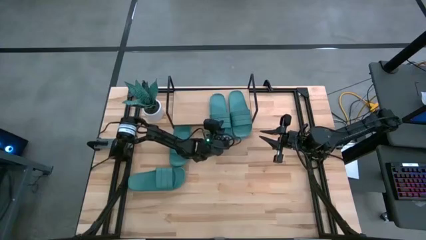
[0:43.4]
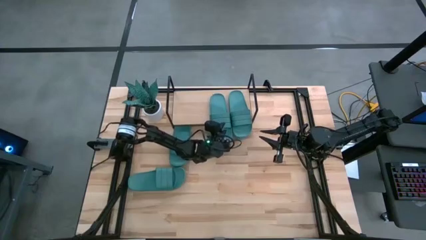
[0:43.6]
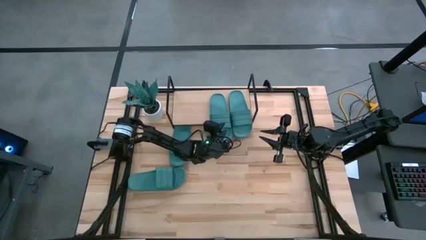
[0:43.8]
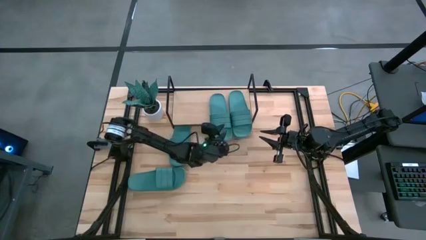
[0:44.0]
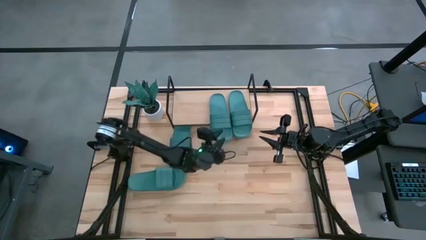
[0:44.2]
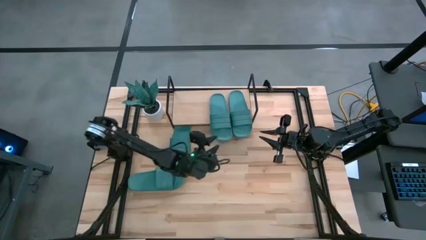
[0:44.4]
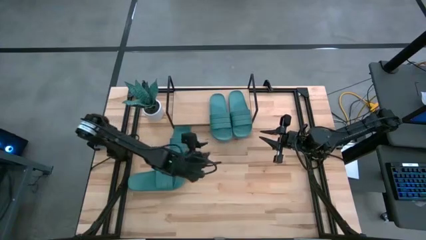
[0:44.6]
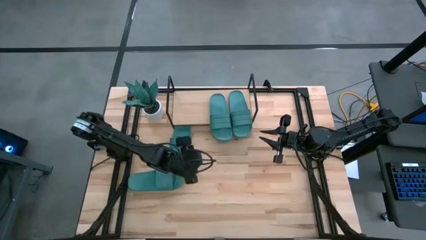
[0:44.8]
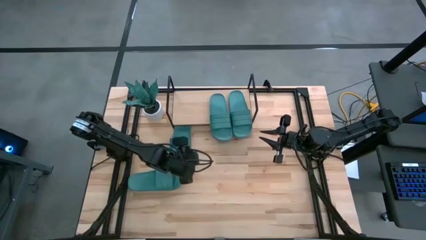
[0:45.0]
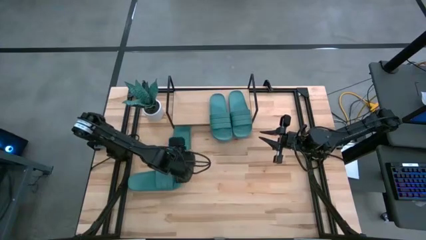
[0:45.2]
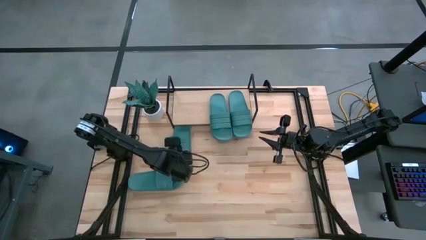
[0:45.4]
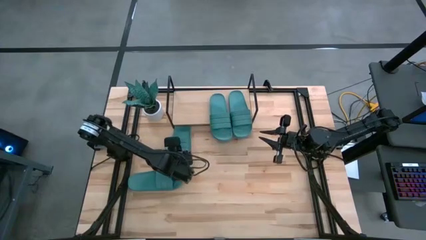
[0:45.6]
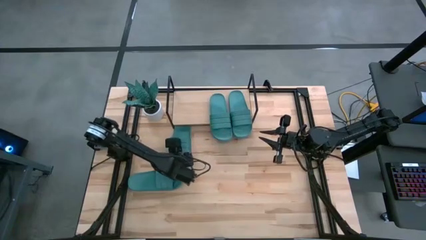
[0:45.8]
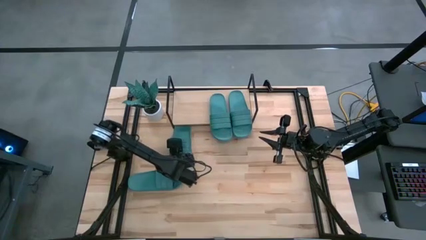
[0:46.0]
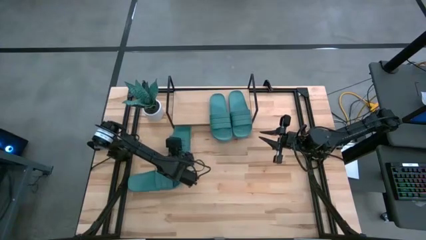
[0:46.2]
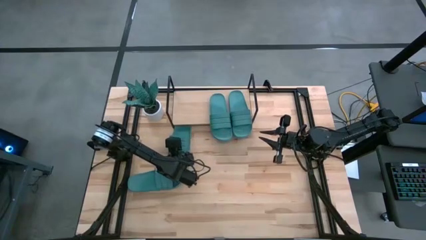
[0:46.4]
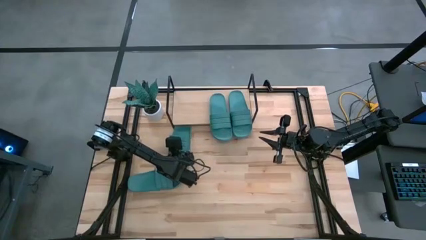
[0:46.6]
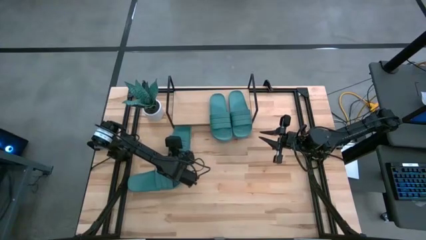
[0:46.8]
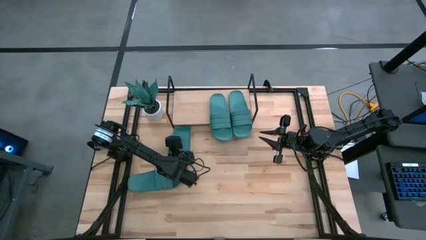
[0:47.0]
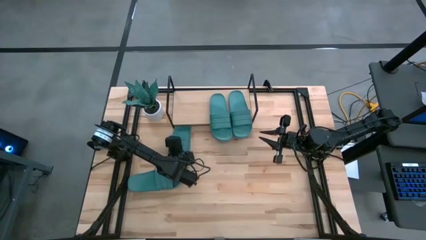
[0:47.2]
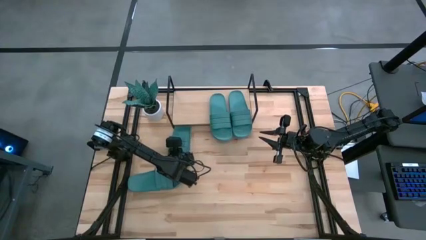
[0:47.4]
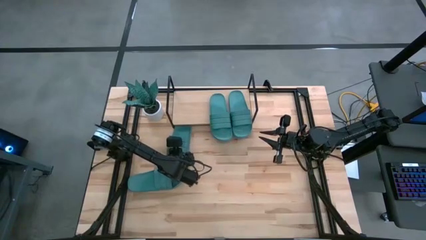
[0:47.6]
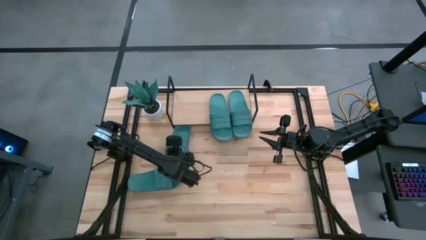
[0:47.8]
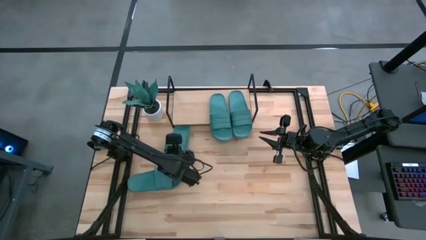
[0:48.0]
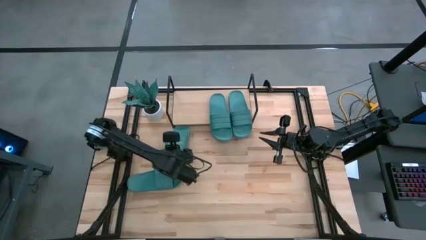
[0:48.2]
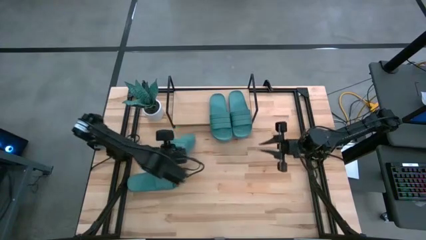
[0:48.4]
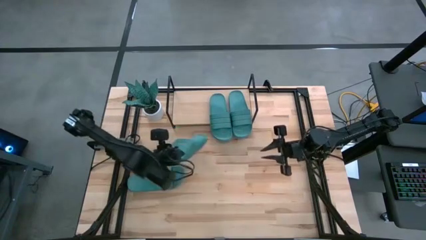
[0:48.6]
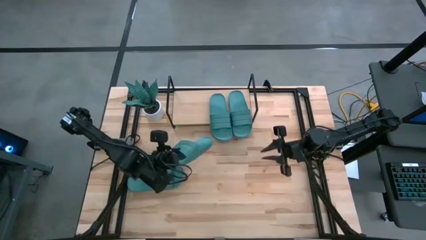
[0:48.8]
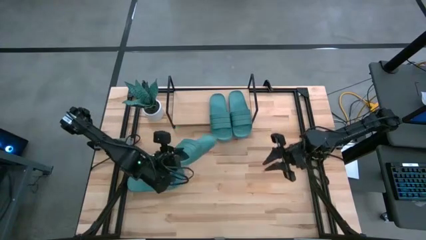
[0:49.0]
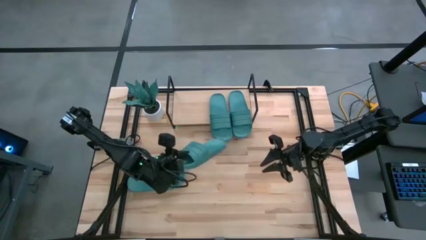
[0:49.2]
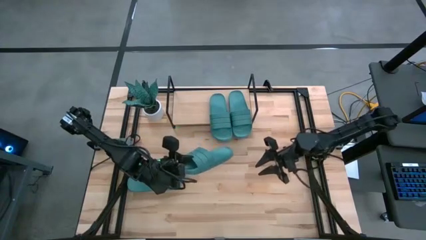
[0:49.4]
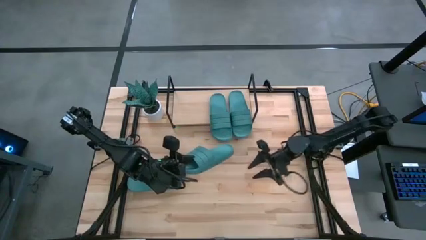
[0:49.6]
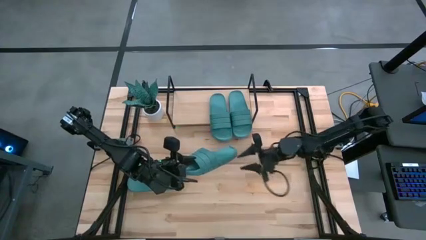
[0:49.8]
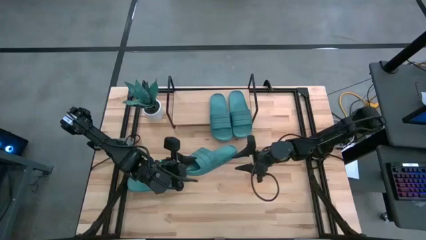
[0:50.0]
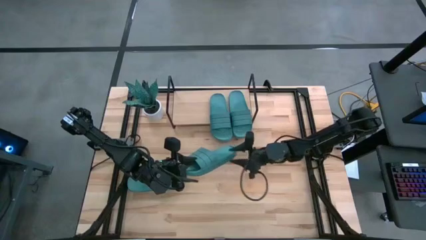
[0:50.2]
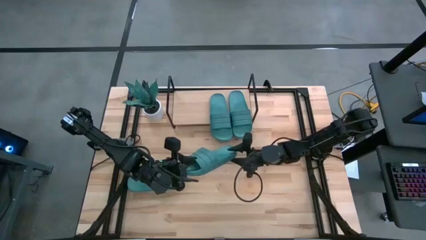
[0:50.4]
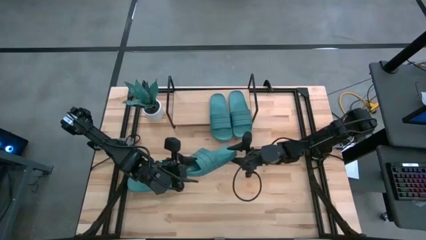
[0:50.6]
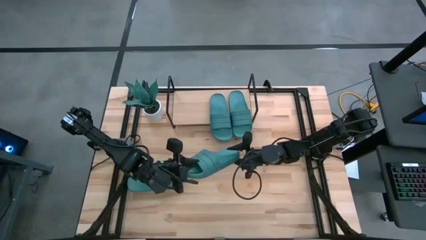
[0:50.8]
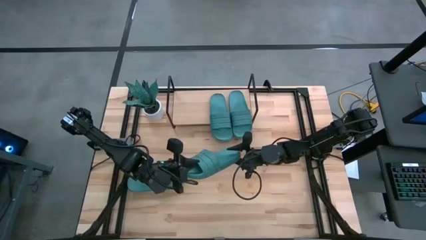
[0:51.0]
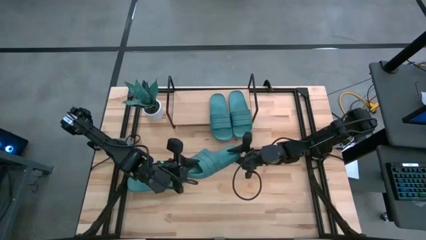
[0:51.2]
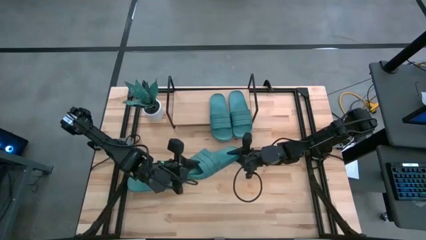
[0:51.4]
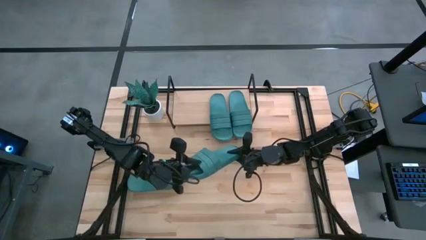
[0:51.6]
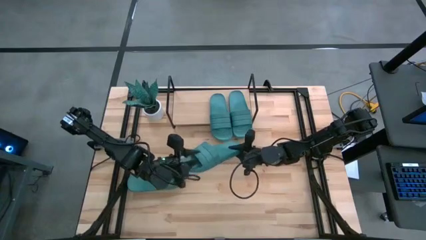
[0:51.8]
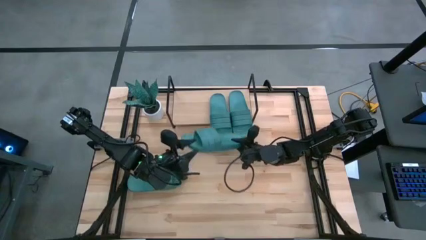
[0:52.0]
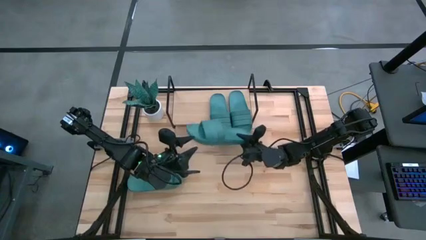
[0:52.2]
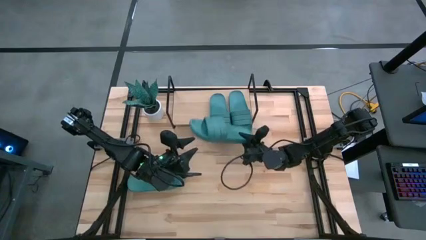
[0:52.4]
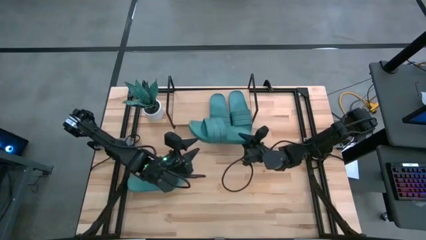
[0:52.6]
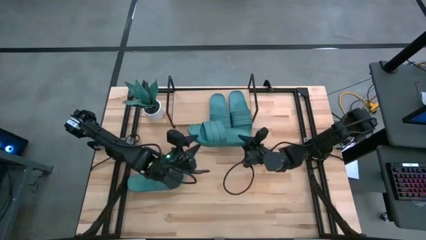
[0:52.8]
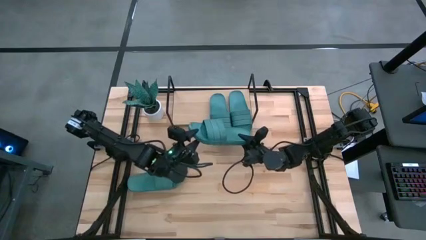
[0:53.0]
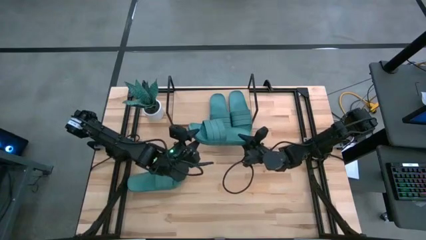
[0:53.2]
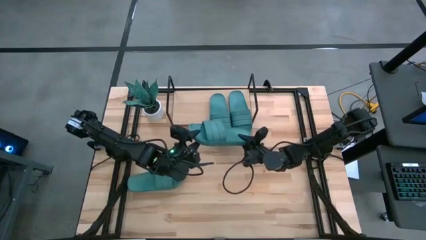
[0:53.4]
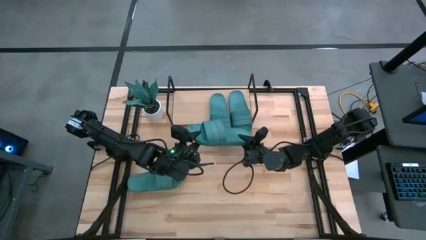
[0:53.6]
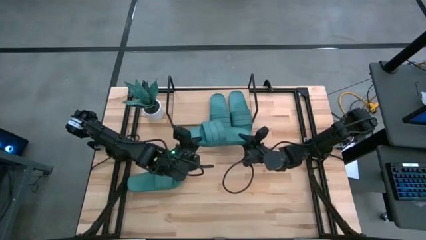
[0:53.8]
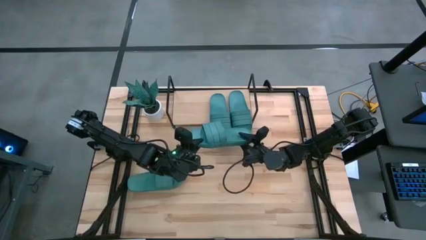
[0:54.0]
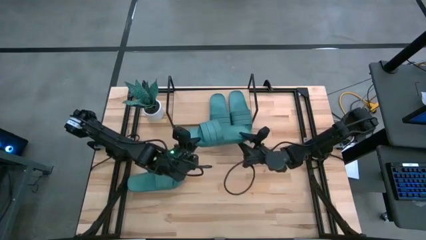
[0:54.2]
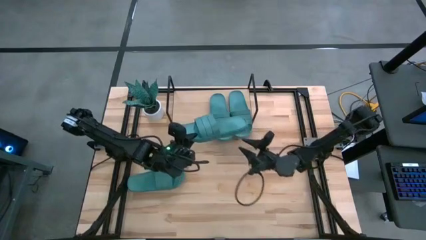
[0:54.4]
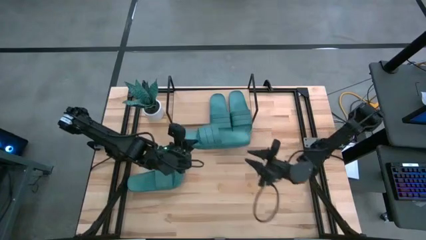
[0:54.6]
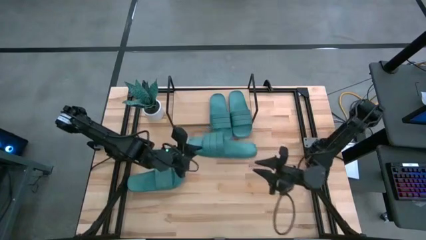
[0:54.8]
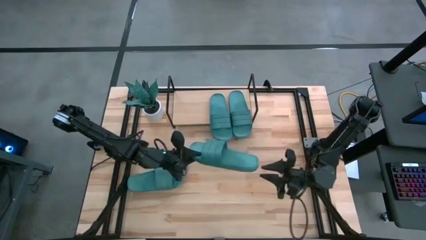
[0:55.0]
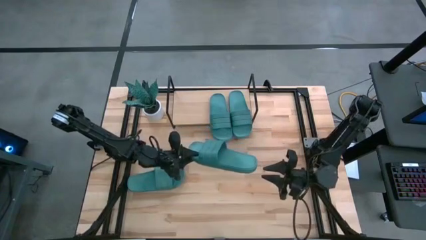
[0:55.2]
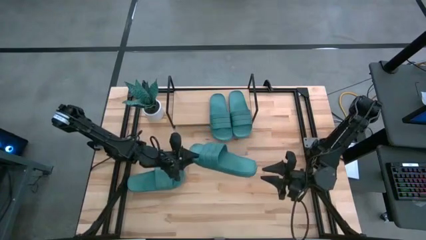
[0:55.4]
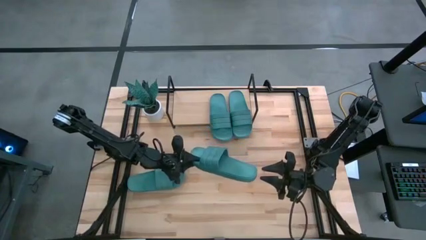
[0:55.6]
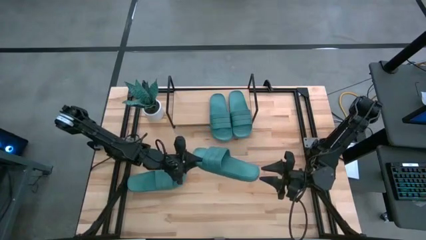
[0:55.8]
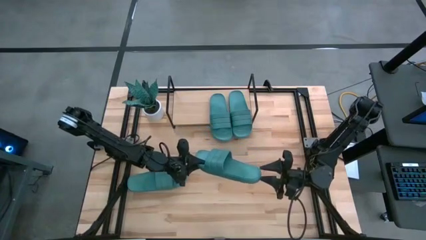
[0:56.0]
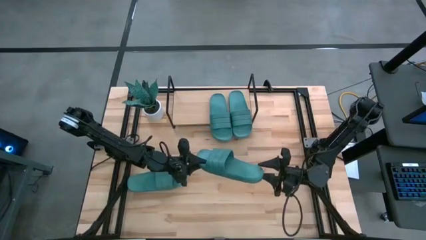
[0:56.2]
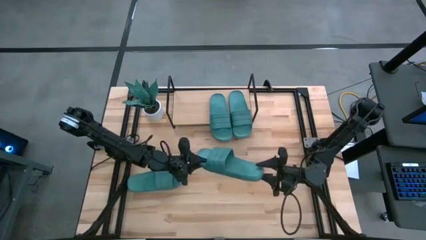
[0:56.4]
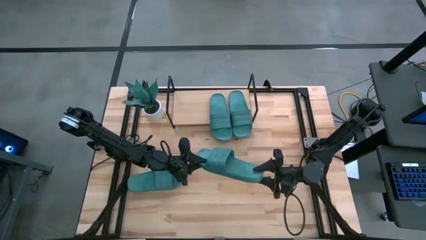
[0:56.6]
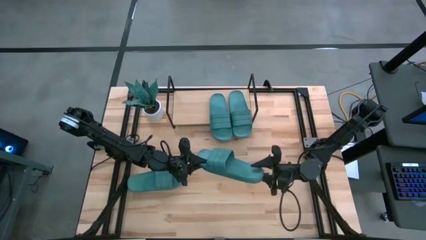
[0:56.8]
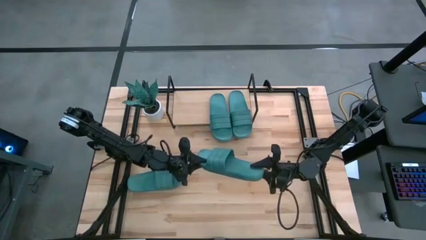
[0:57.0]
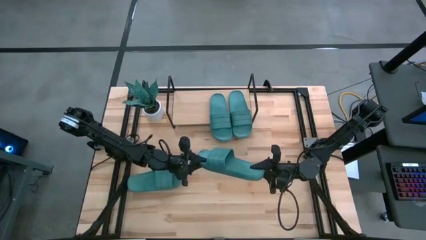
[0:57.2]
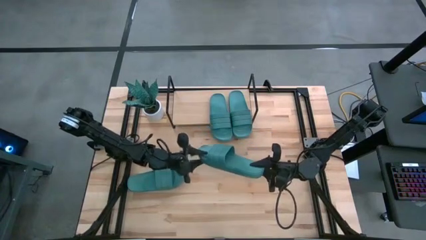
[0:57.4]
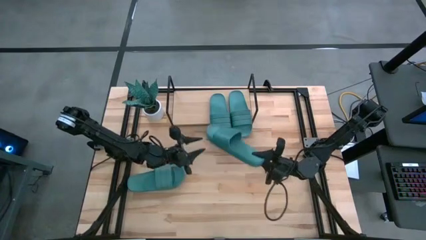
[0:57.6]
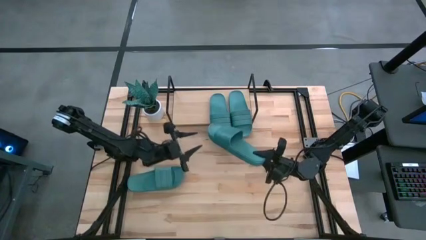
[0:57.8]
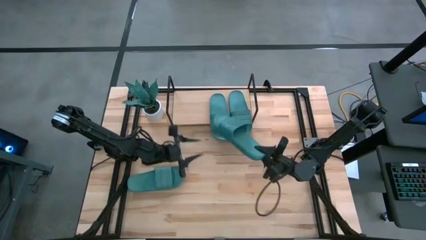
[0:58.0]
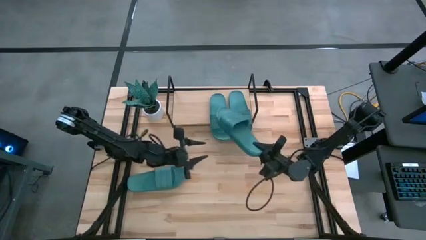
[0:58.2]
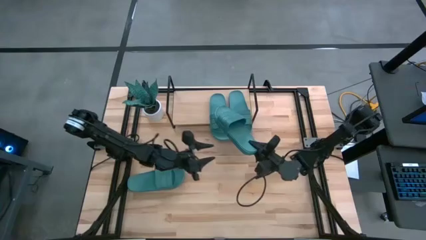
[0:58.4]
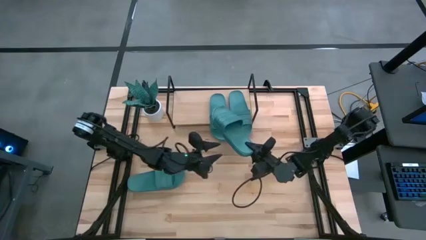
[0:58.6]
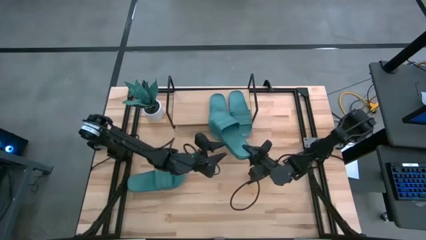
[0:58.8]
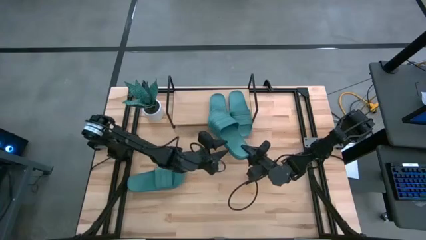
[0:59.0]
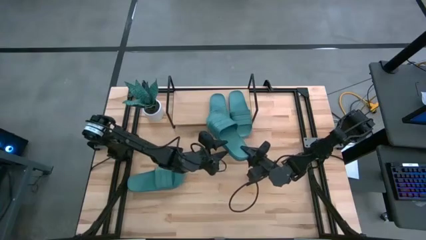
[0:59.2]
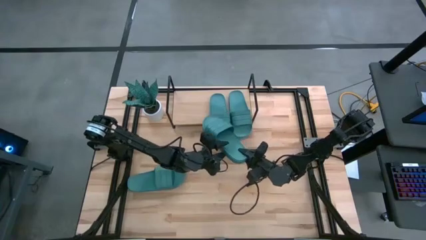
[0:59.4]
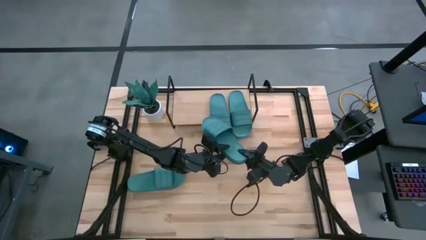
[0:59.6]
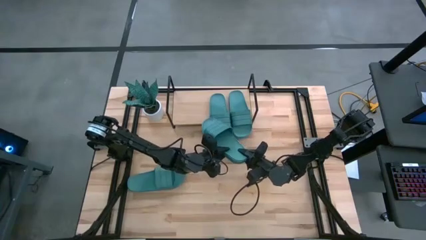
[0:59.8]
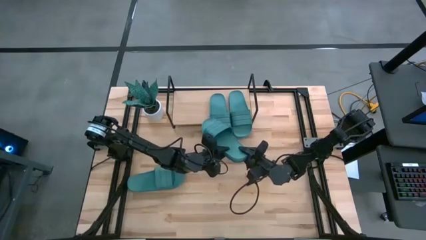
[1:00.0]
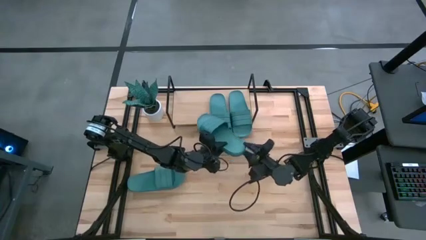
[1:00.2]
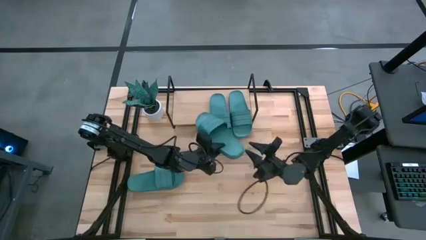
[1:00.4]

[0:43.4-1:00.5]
Task: Pick and place slides into the shelf
Put the slipper on the shelf
